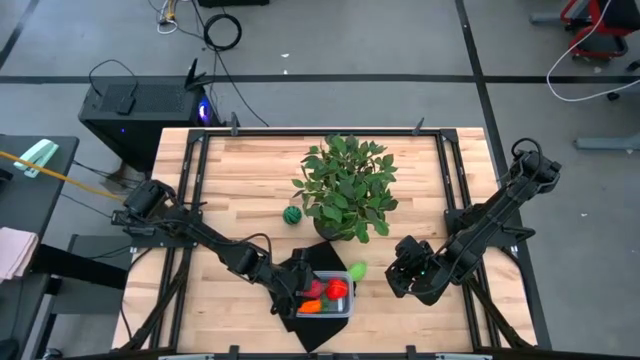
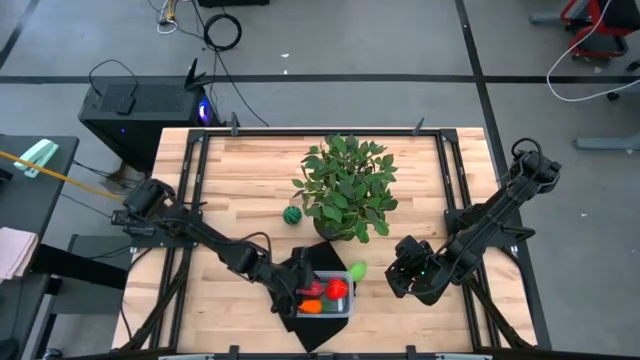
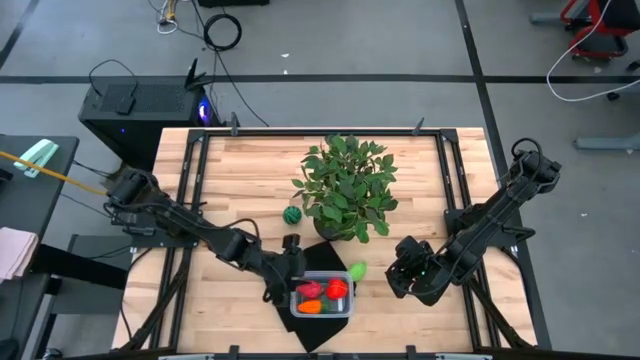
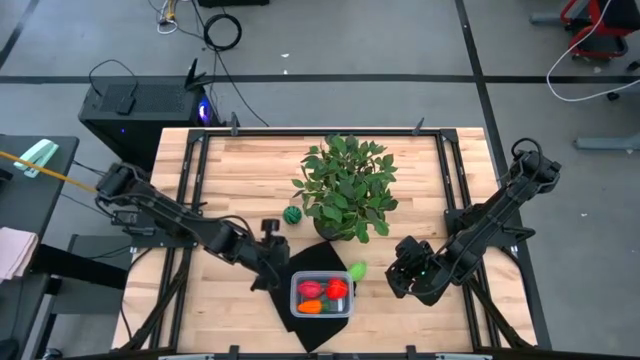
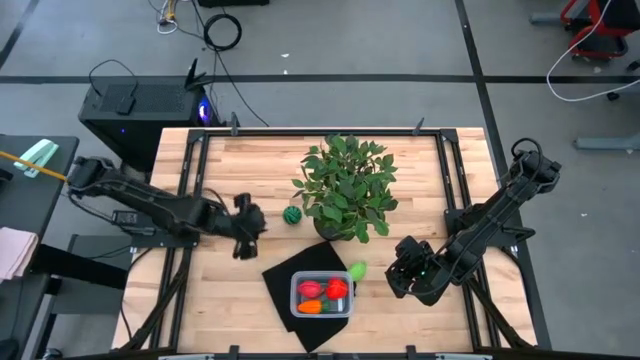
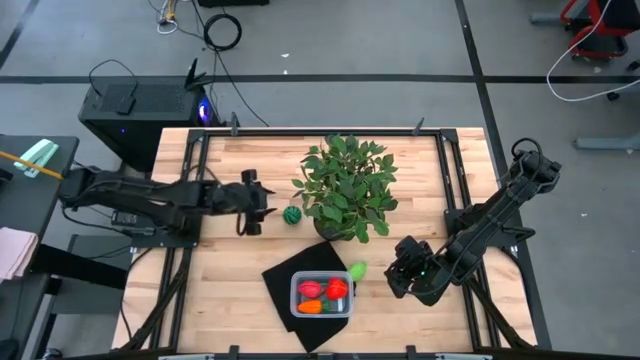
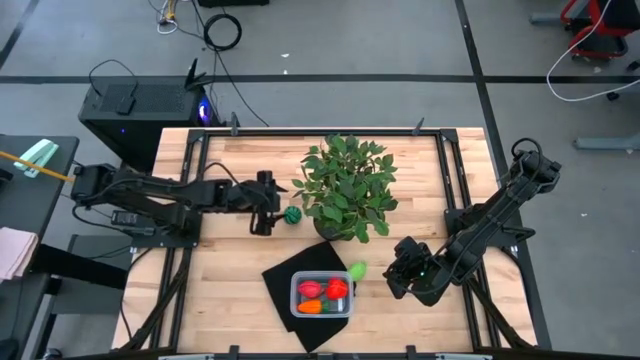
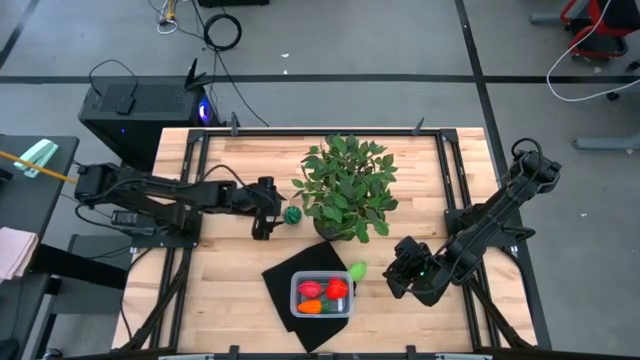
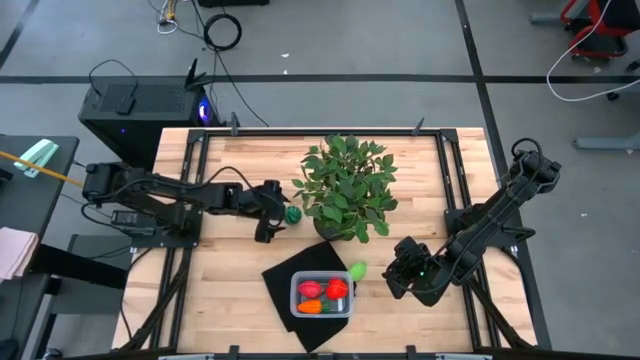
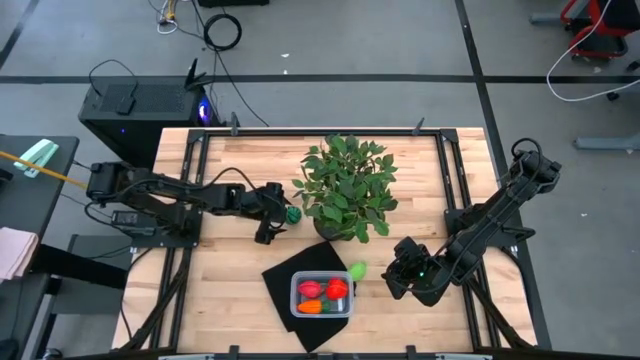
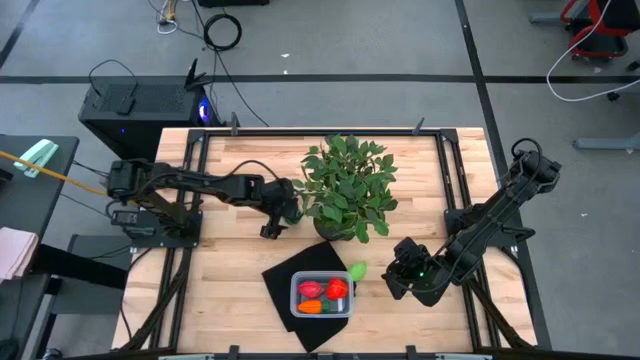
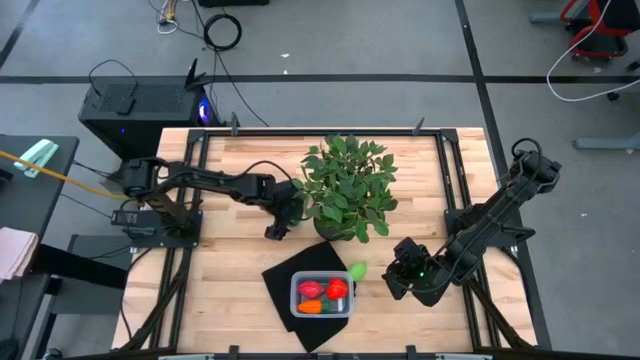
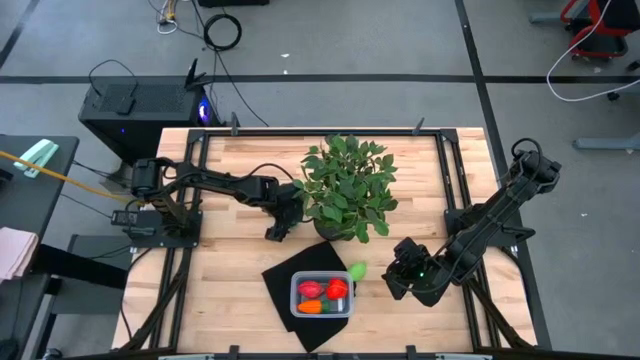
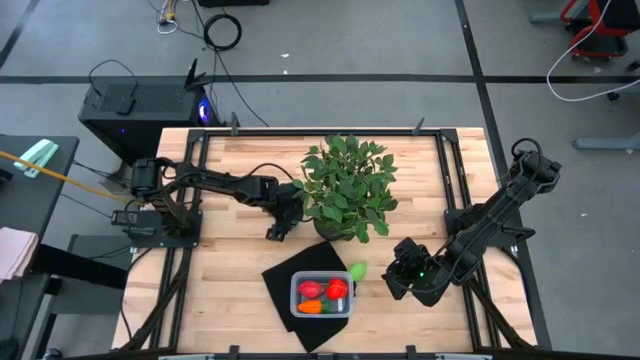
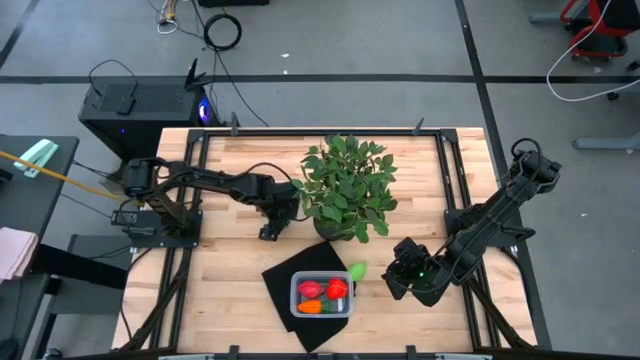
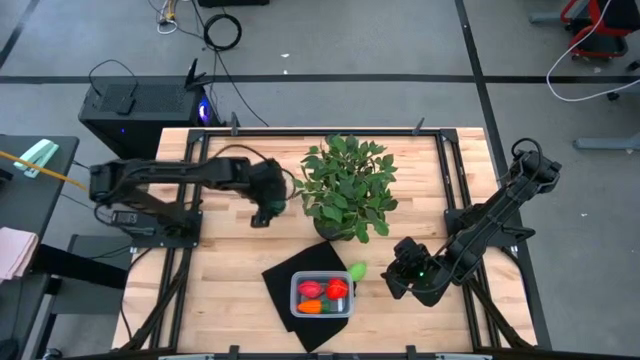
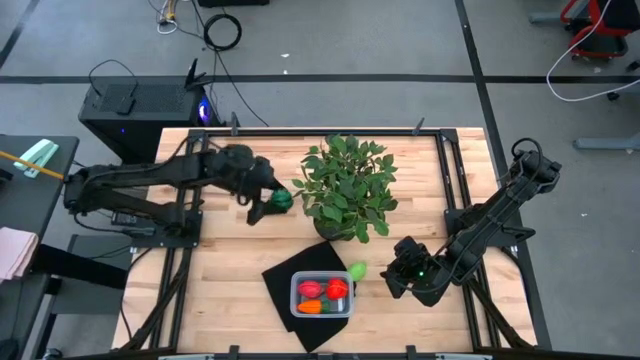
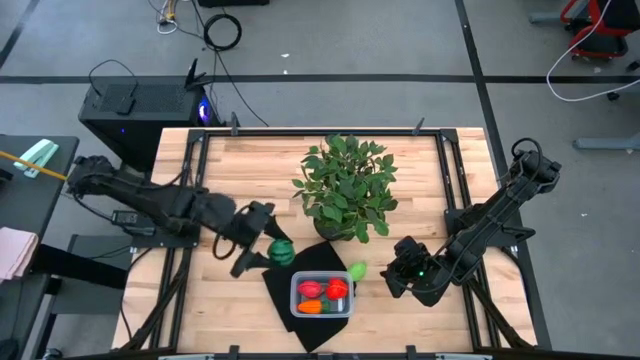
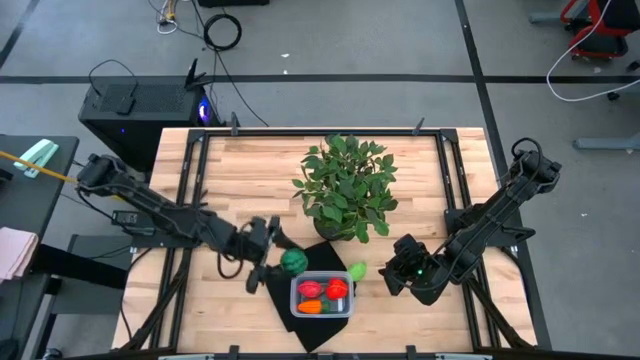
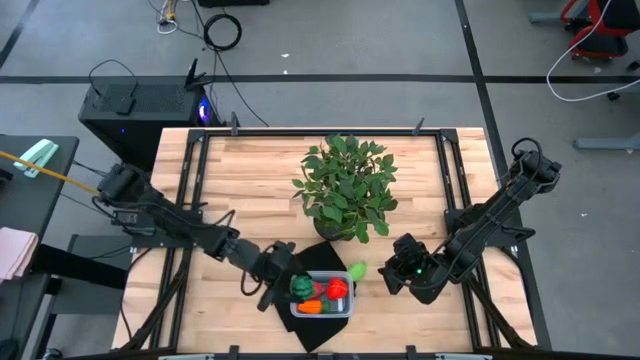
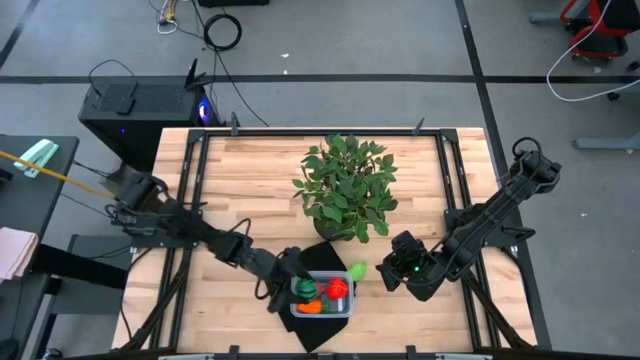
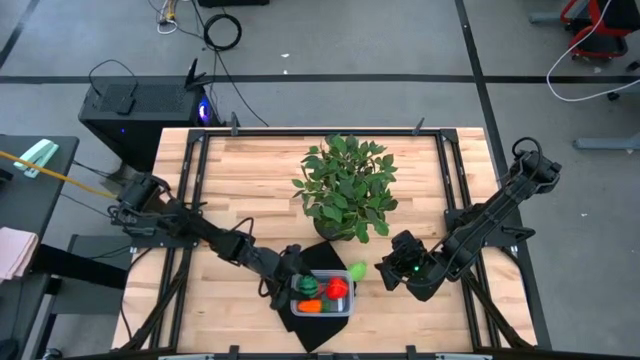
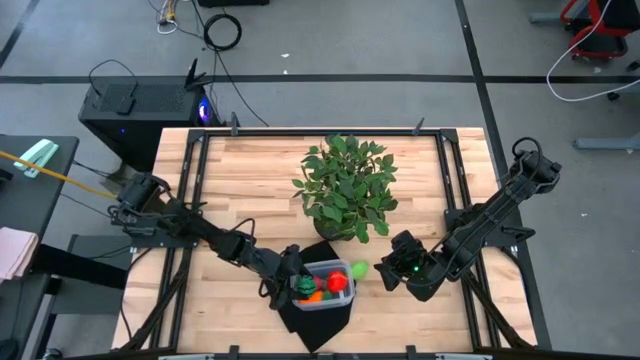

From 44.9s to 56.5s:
Task: Pick and placing Produce into tupperware
Put the green watermelon into the transparent bin

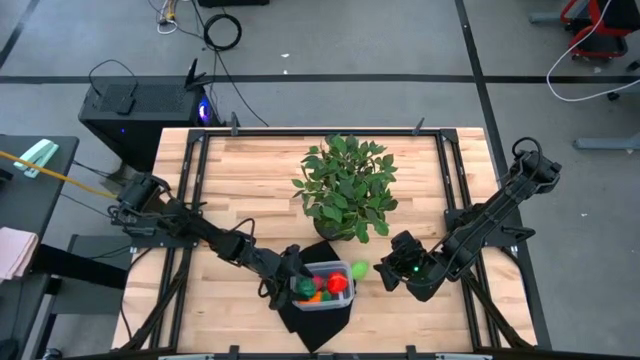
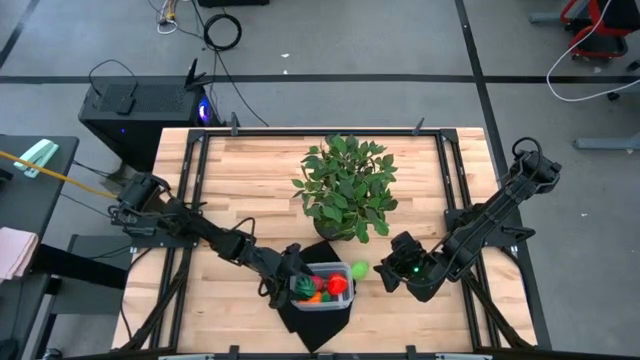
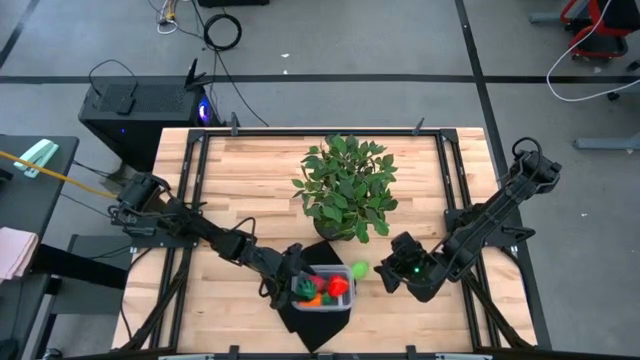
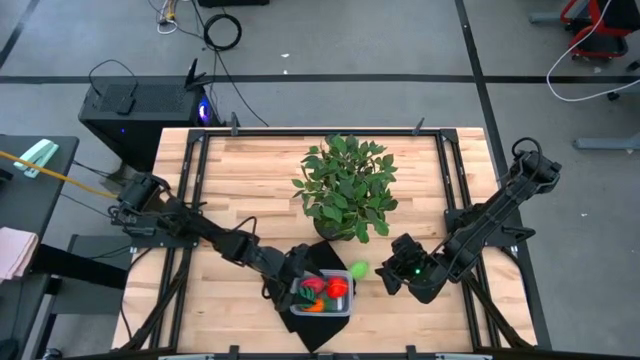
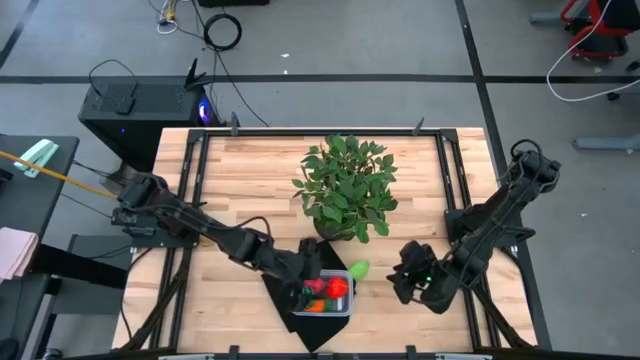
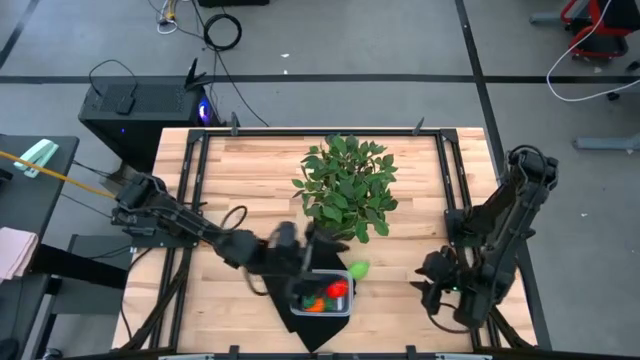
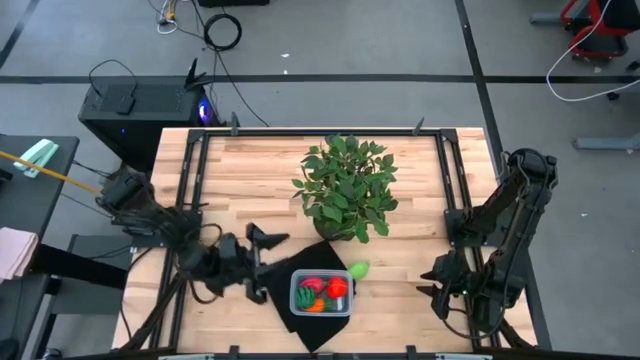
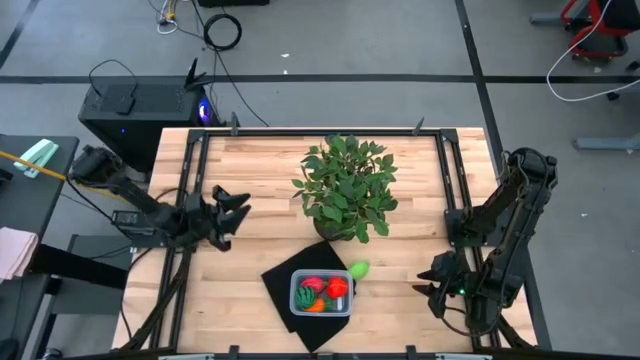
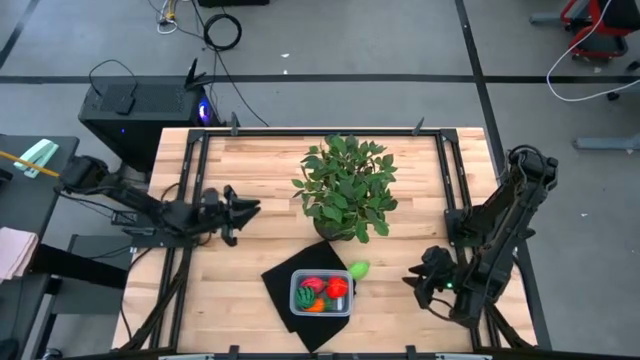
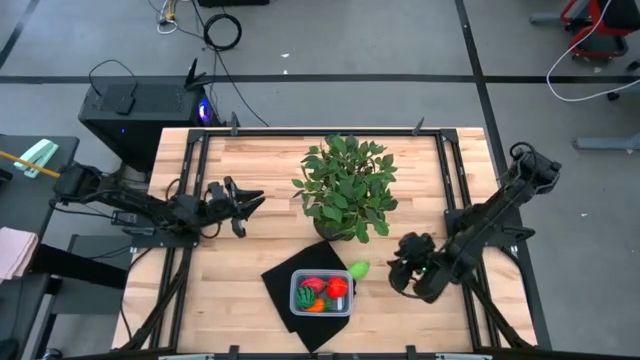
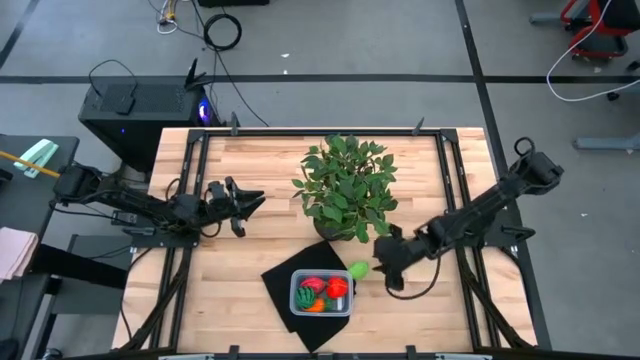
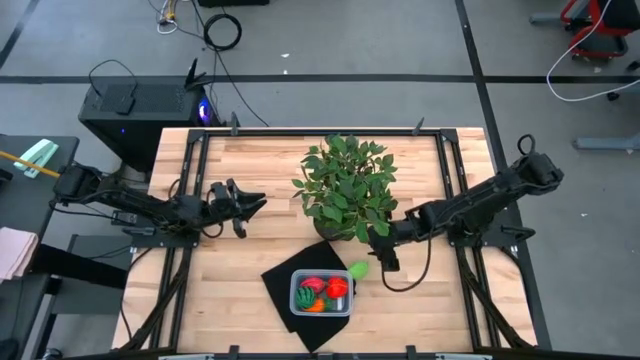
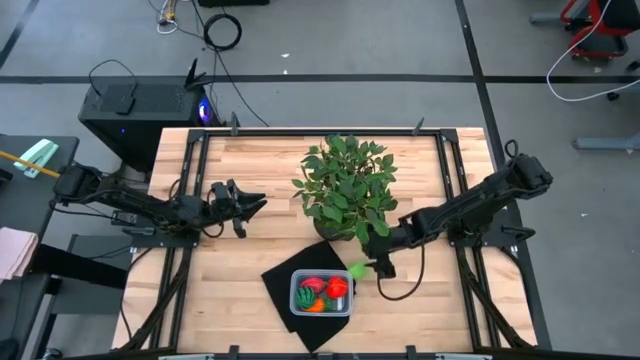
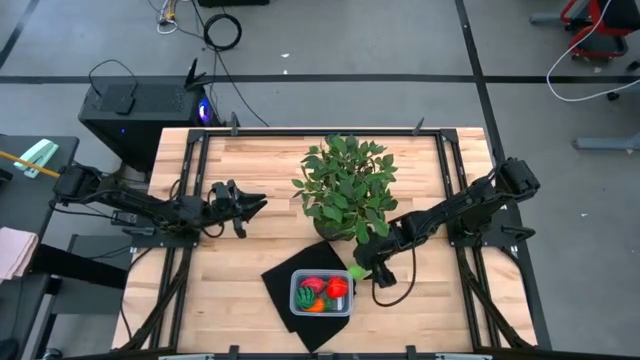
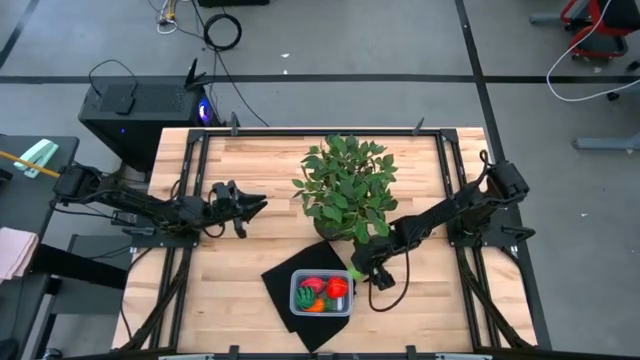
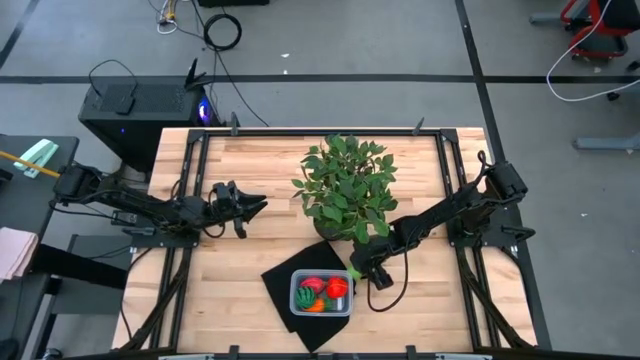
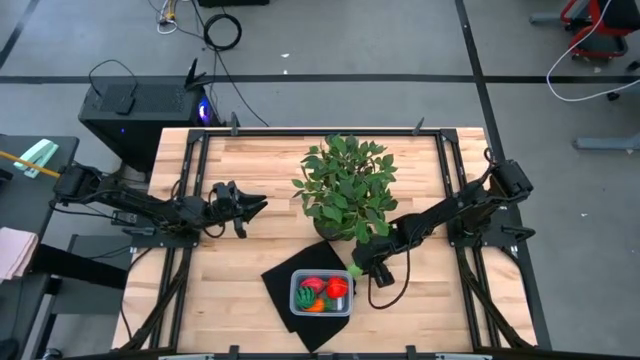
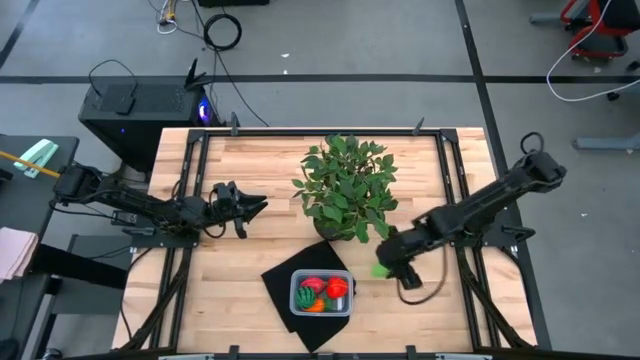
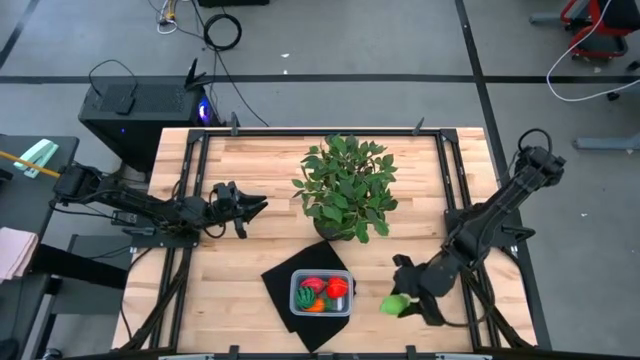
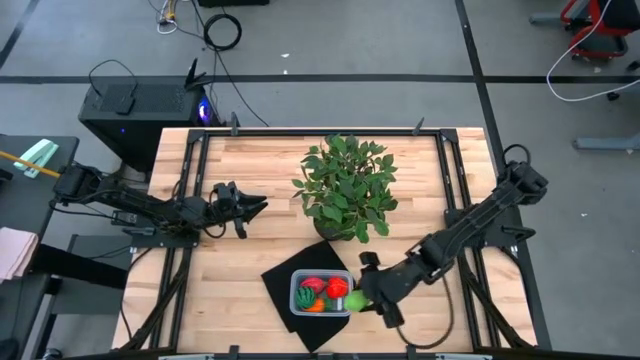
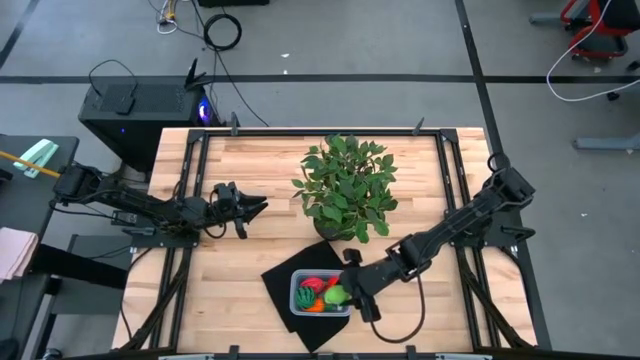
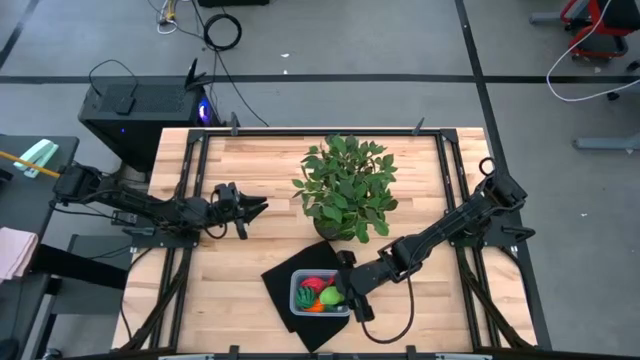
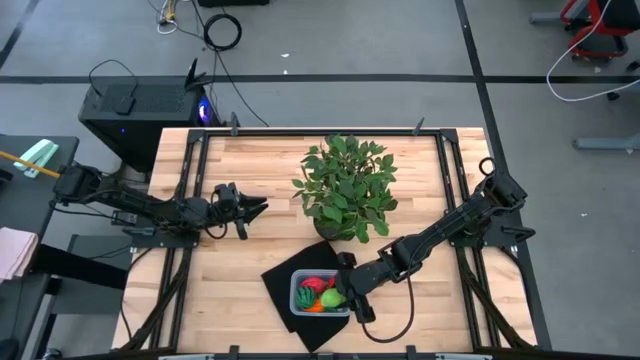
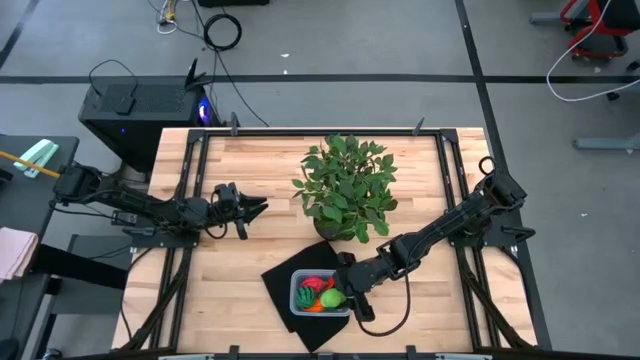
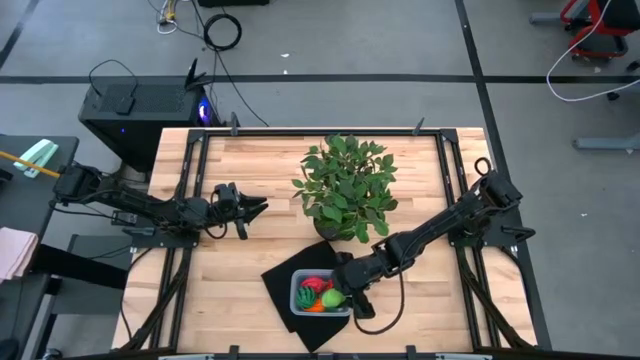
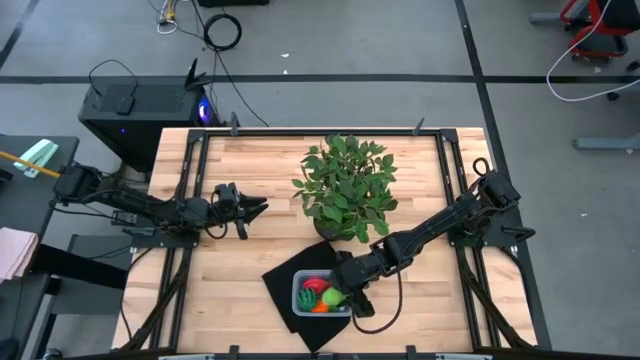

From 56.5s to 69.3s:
Put the green melon into the transparent bin
